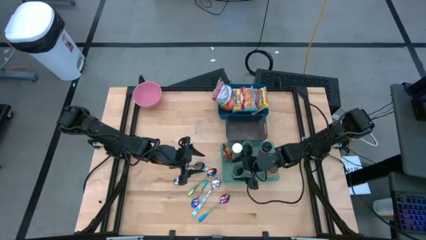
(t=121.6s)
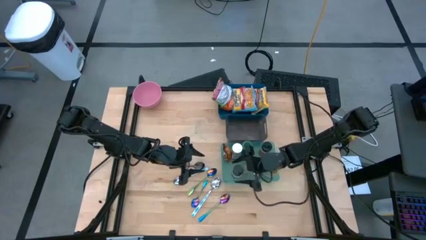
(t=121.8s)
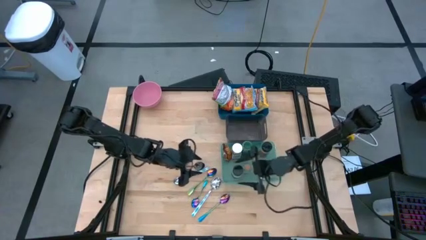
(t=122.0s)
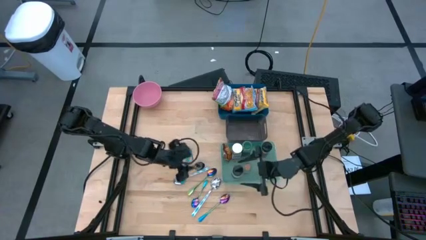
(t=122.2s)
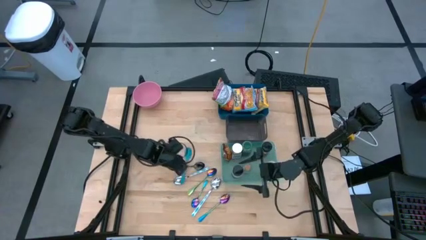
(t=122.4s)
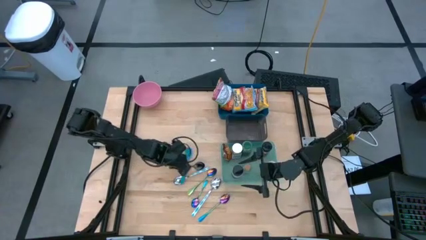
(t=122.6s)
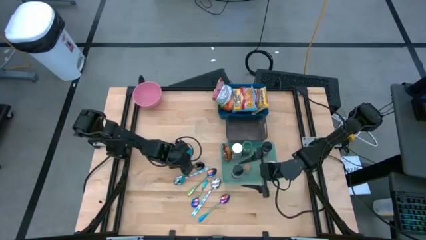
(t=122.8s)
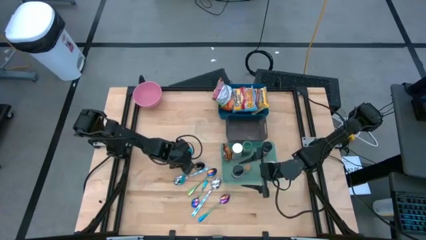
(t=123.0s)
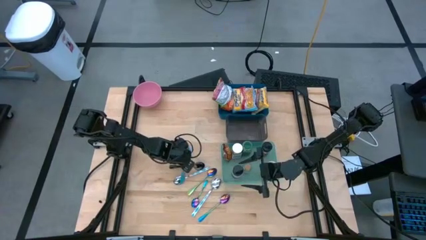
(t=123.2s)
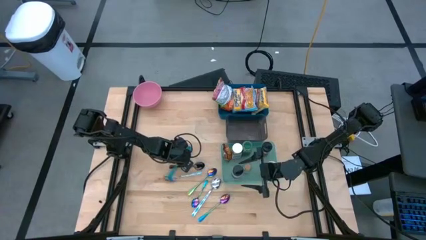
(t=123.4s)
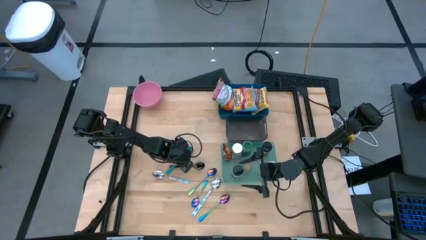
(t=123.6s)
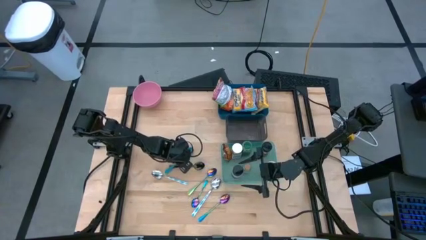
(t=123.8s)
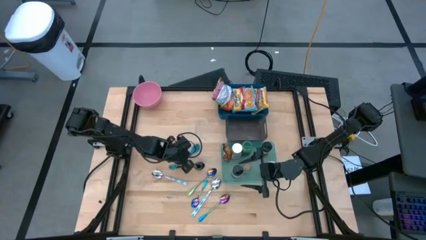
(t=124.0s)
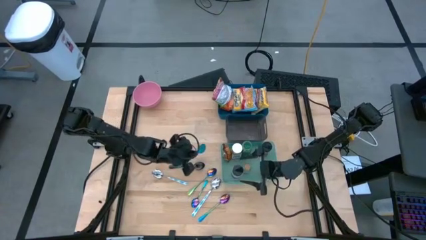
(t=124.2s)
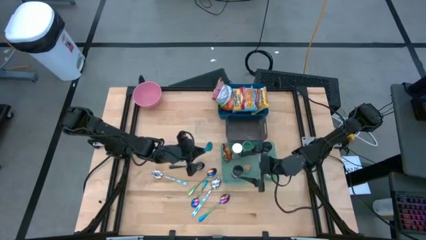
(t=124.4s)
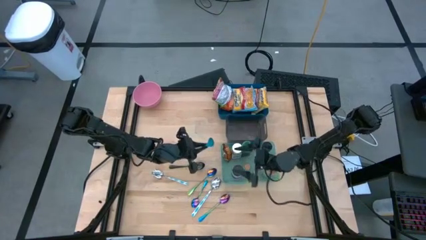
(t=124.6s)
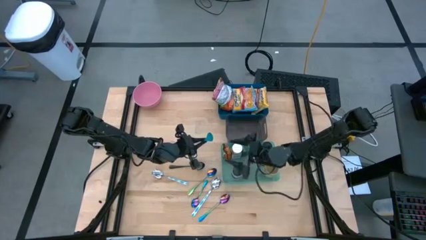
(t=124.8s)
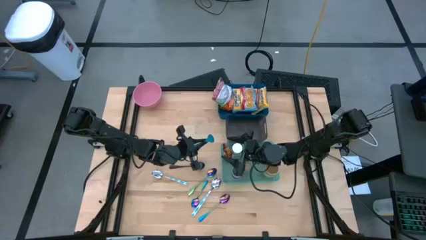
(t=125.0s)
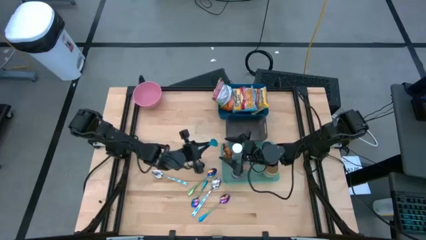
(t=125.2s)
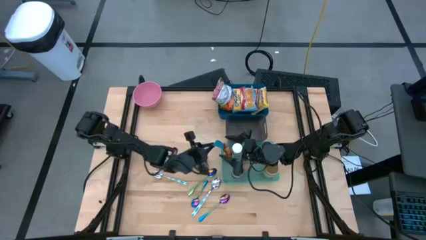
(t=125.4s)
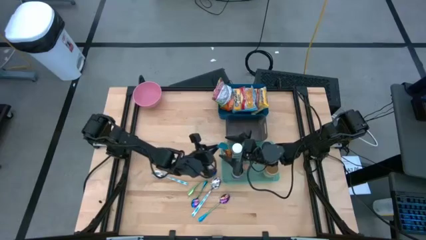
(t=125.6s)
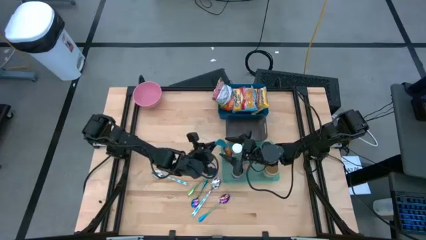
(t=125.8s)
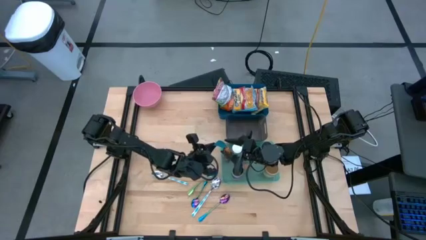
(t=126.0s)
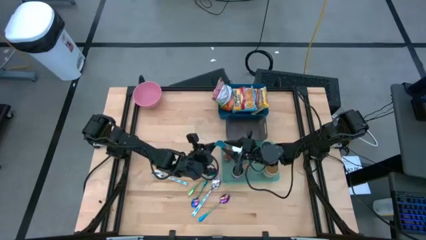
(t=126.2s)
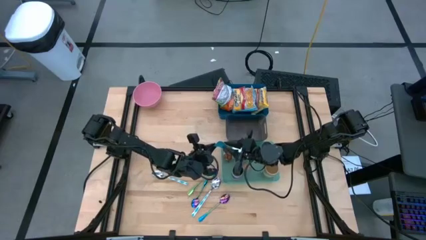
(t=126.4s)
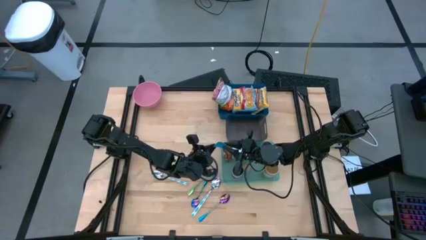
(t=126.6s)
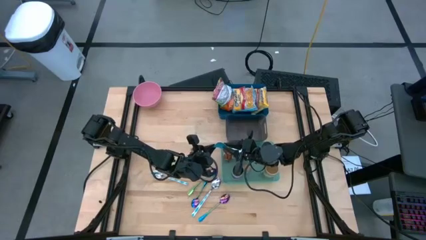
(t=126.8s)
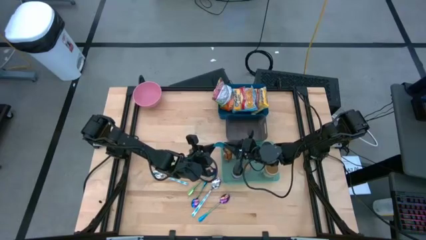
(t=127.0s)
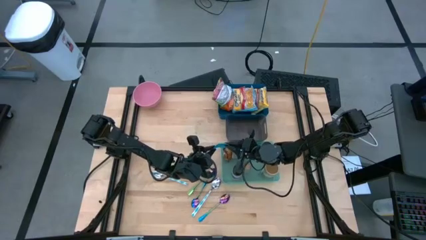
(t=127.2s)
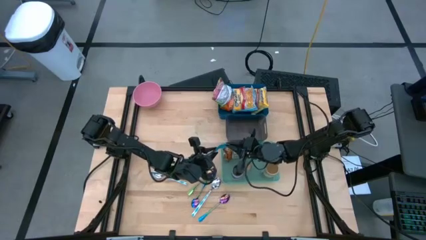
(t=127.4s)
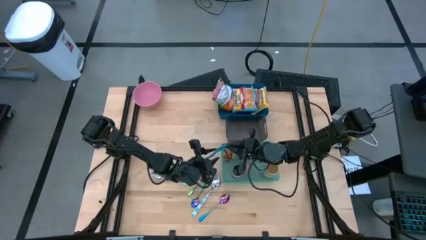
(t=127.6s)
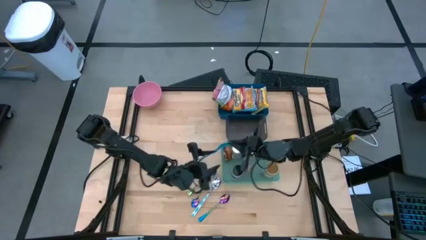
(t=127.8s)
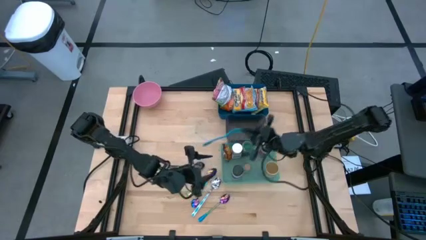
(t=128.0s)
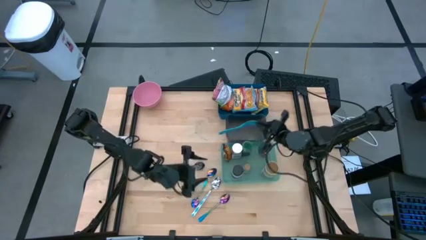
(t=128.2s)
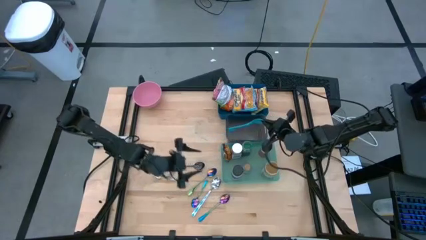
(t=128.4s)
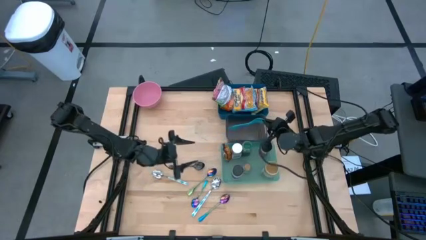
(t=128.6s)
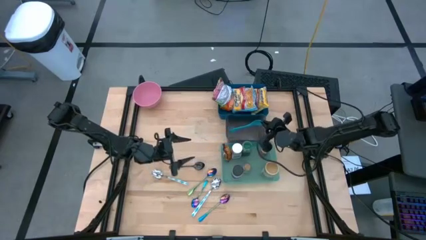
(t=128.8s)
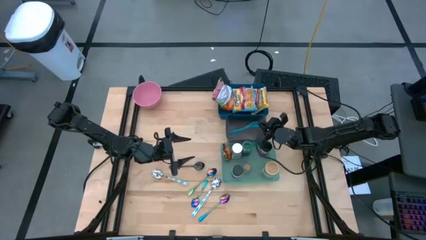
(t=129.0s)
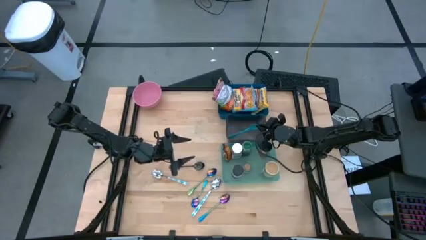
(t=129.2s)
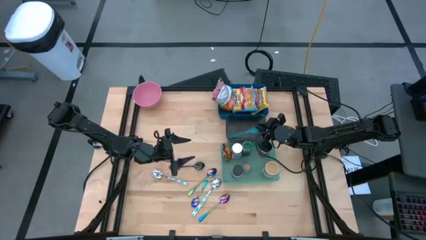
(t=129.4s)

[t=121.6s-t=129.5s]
Task: Pick & Place Food Item
Put the blue baby spoon into the black bin

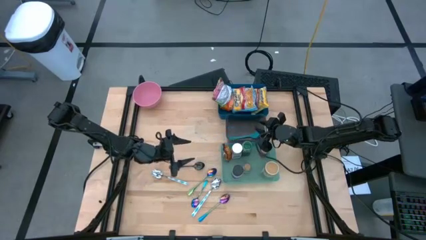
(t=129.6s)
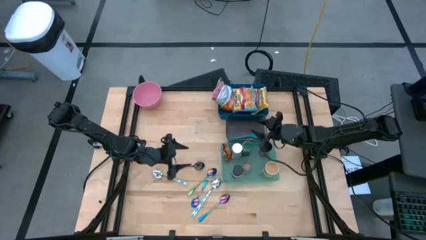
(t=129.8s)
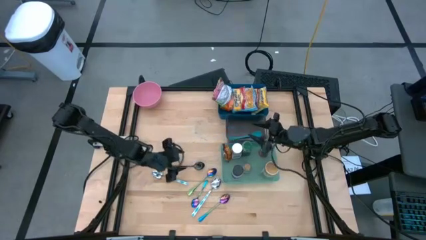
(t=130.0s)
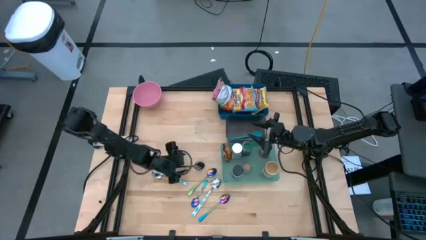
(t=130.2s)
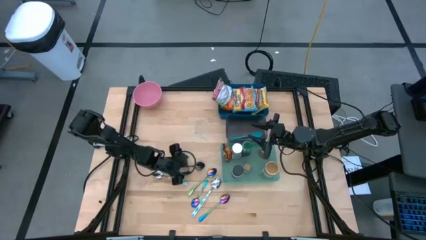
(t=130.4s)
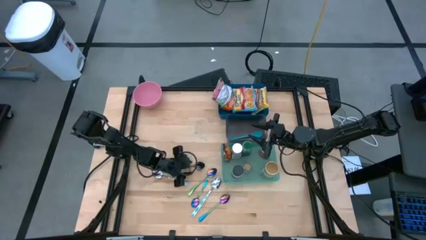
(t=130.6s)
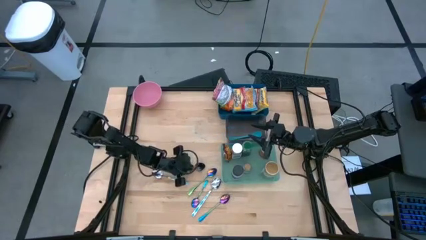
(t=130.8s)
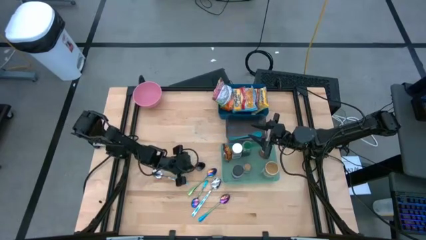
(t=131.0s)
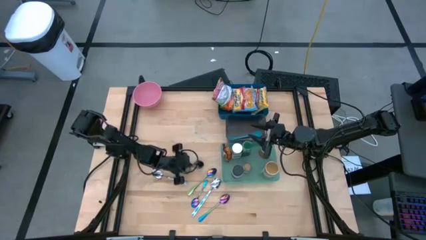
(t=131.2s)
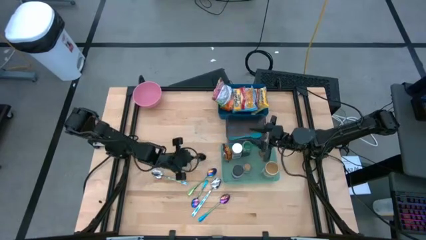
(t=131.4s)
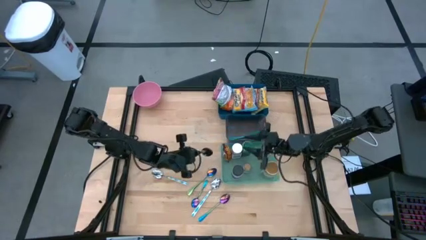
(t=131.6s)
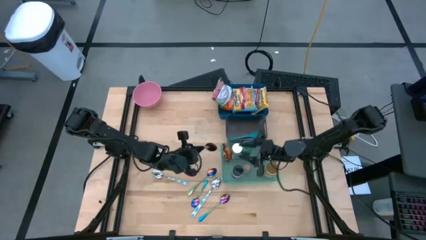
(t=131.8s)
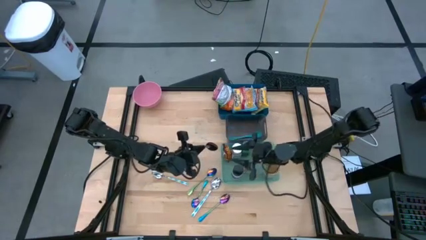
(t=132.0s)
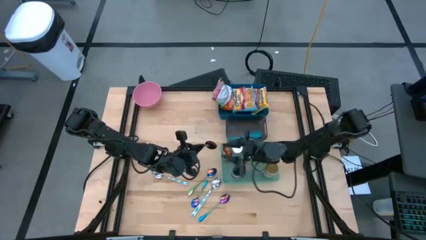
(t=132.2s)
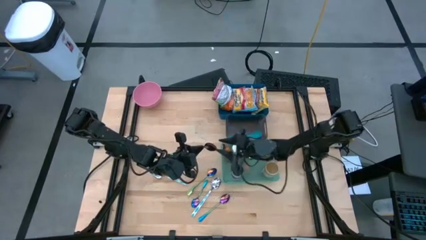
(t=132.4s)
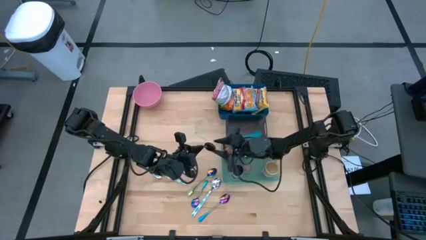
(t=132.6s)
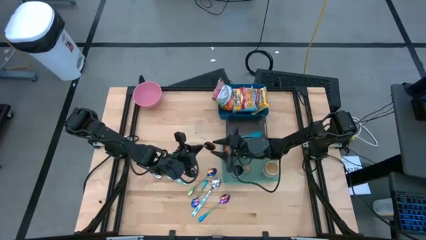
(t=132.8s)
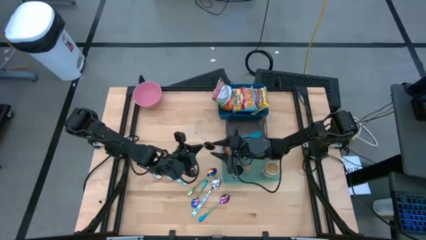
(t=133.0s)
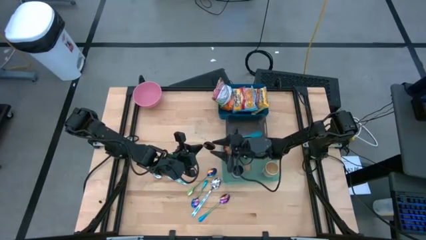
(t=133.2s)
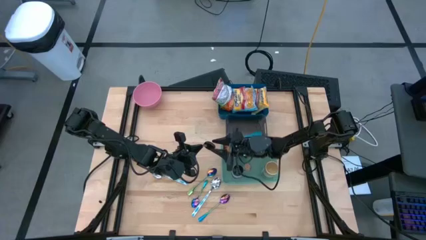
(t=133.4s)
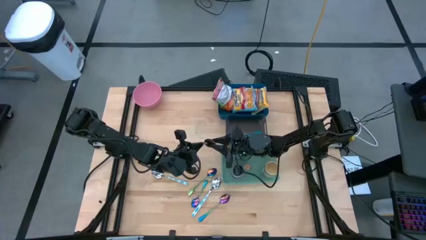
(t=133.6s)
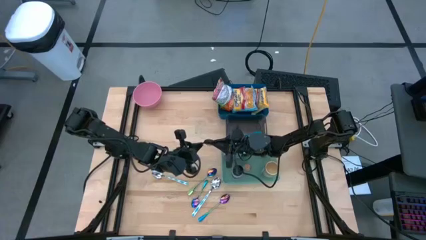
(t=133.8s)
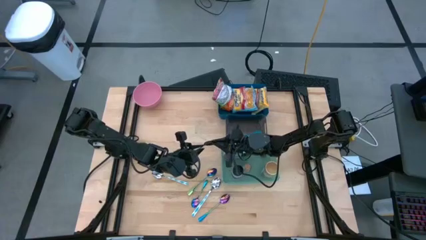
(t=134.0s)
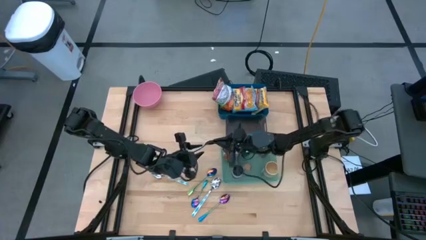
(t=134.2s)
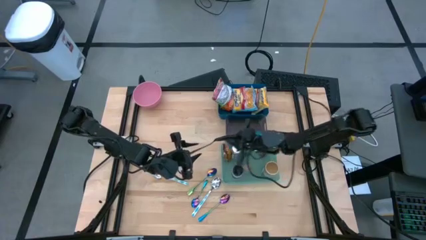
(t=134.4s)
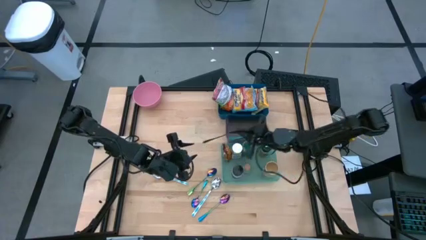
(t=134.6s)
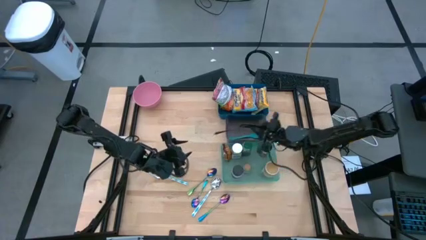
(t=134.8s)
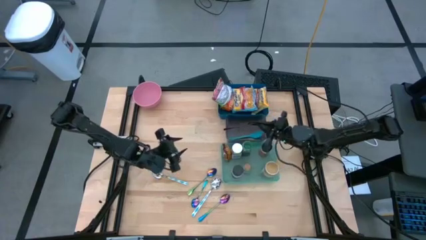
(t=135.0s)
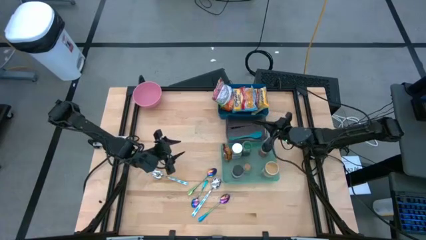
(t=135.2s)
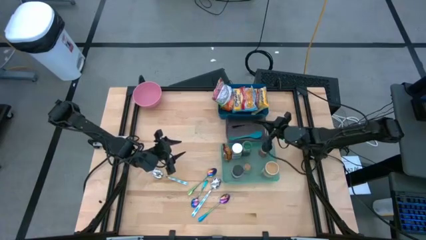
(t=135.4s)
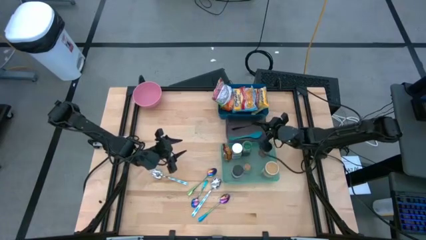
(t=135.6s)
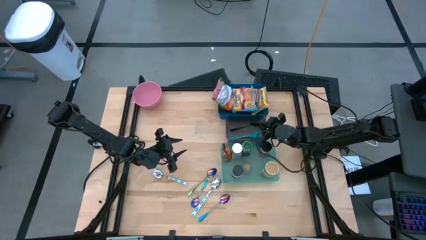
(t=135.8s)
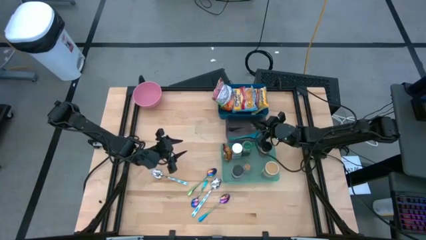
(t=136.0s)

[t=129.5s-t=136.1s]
Put the black spoon into the black bin
